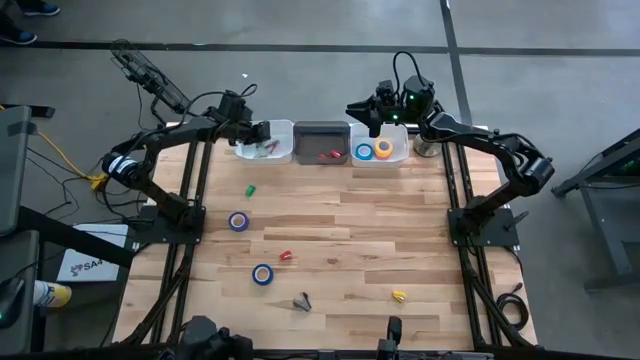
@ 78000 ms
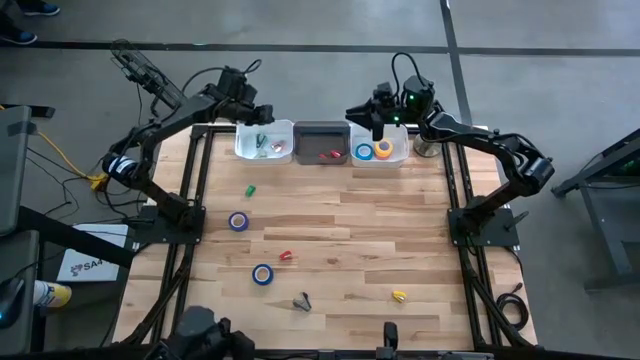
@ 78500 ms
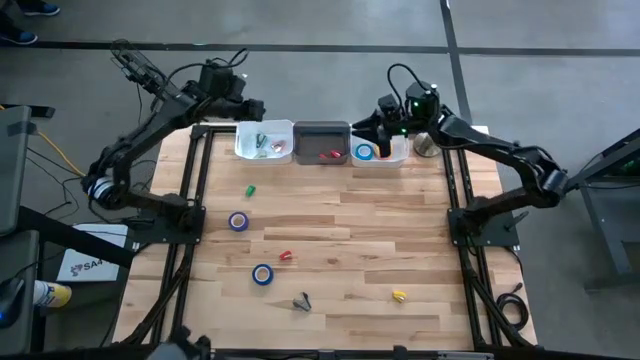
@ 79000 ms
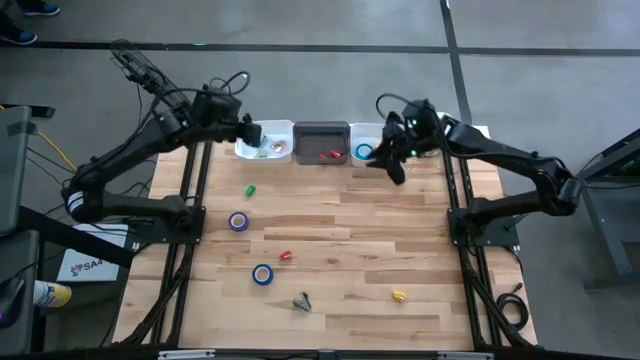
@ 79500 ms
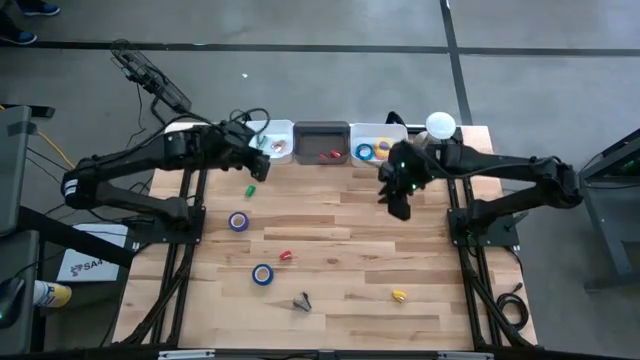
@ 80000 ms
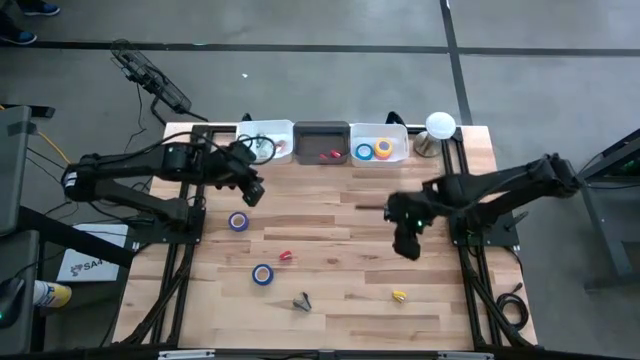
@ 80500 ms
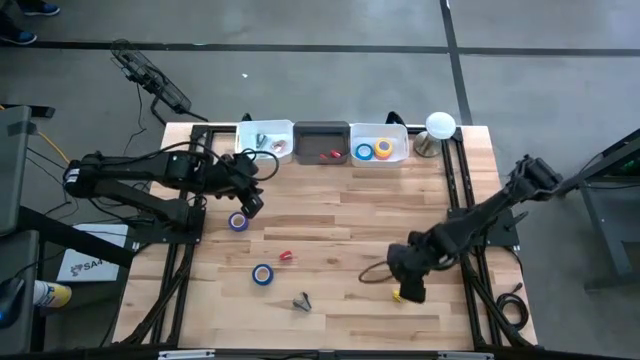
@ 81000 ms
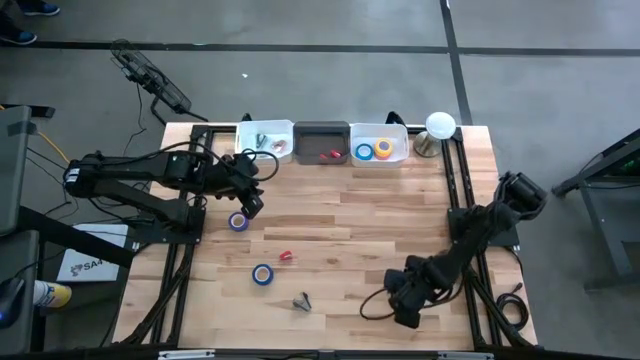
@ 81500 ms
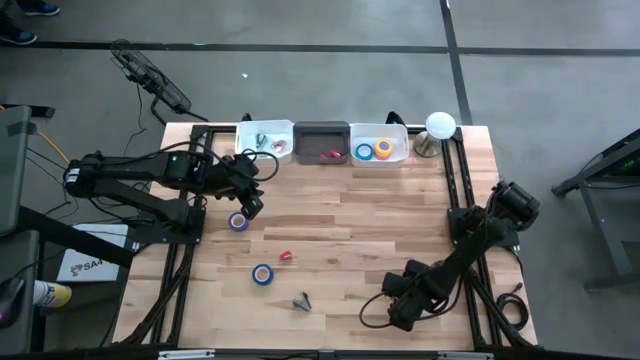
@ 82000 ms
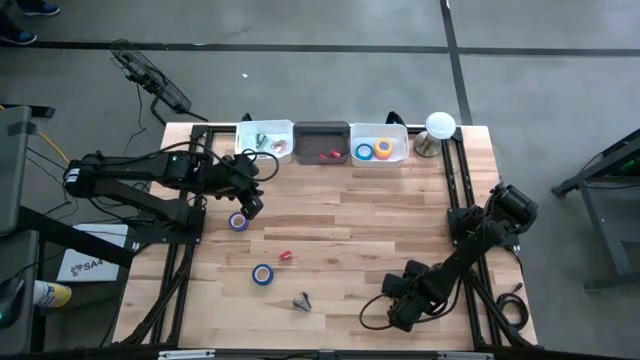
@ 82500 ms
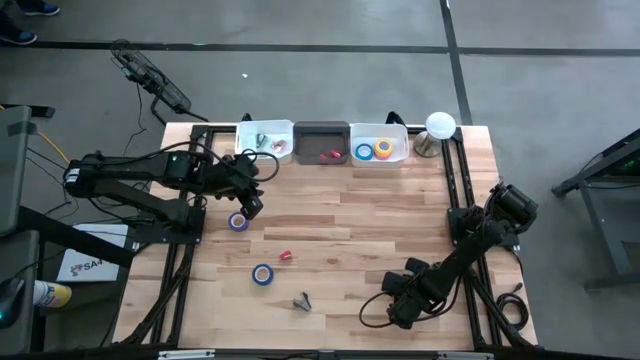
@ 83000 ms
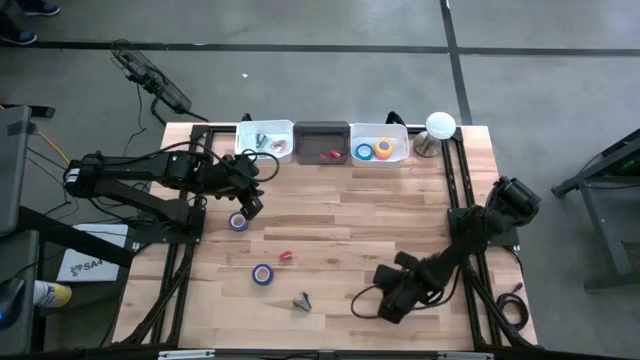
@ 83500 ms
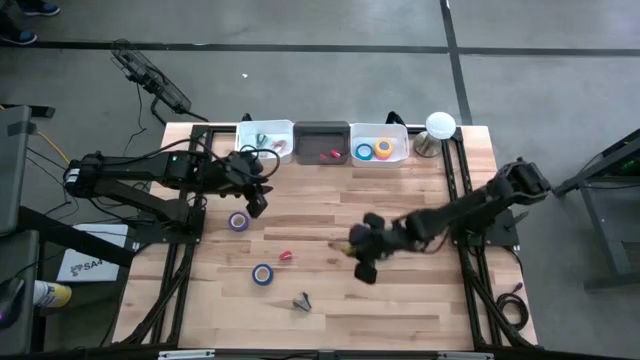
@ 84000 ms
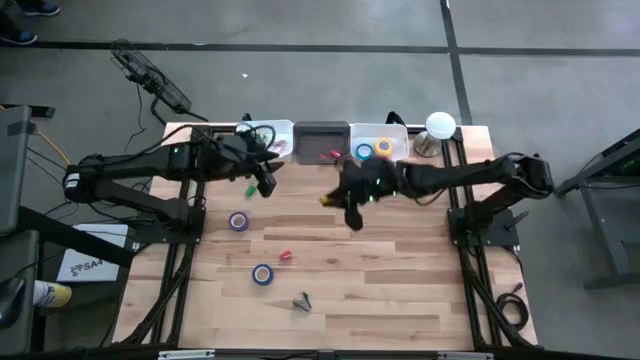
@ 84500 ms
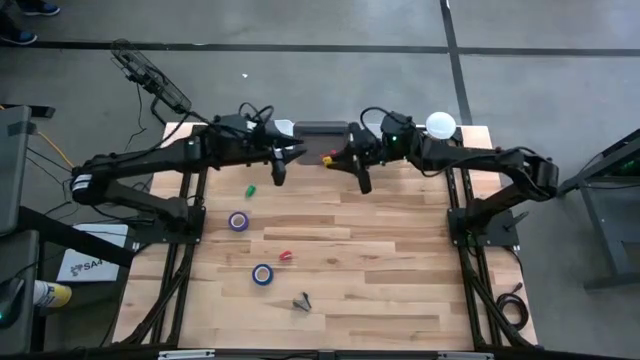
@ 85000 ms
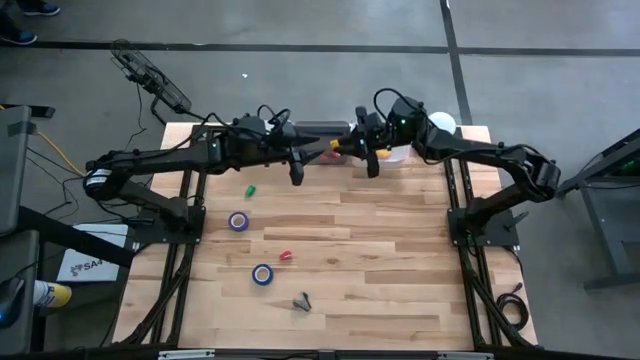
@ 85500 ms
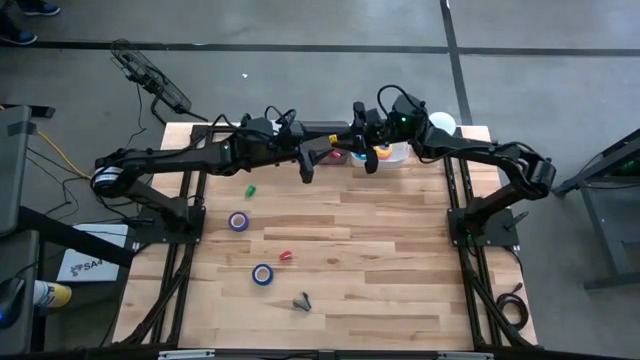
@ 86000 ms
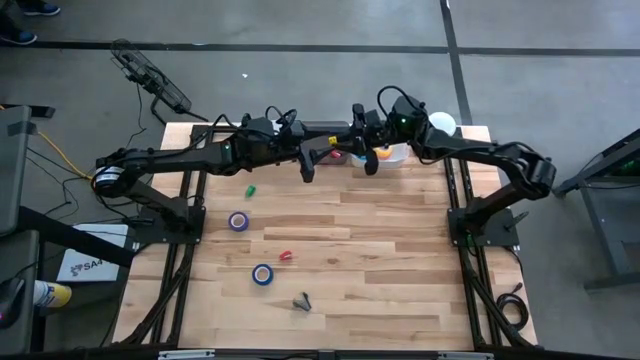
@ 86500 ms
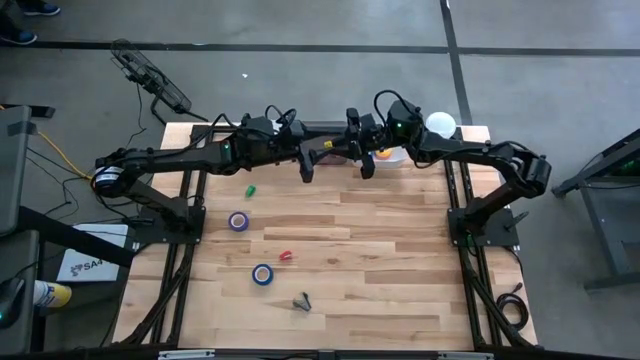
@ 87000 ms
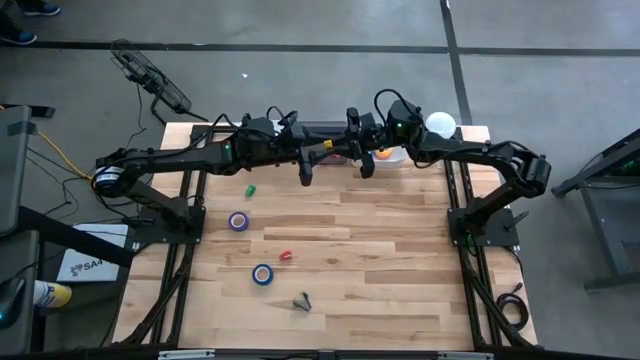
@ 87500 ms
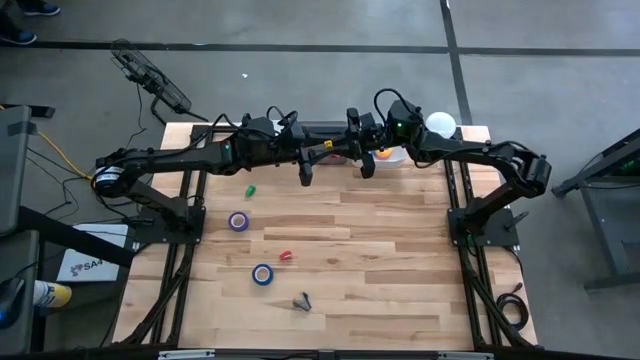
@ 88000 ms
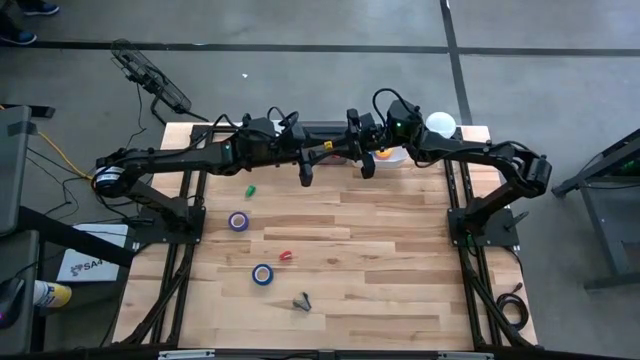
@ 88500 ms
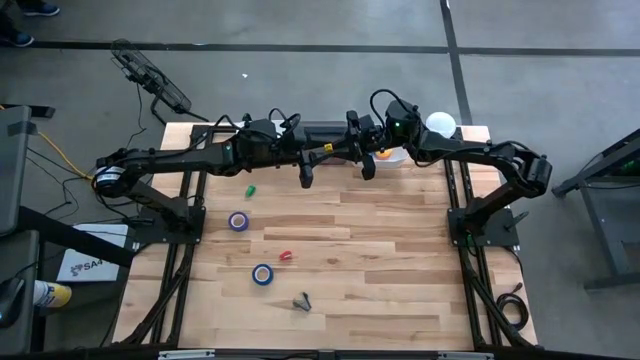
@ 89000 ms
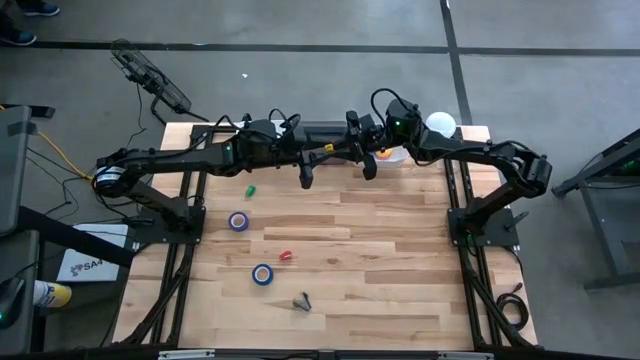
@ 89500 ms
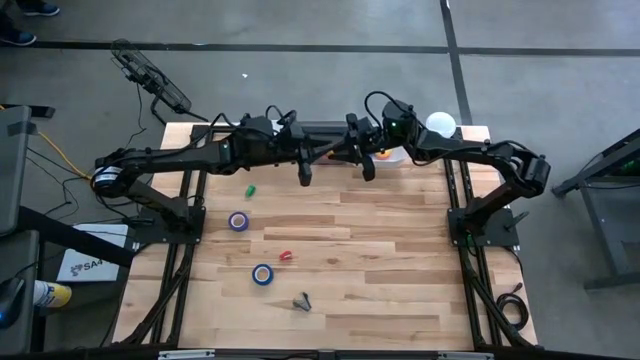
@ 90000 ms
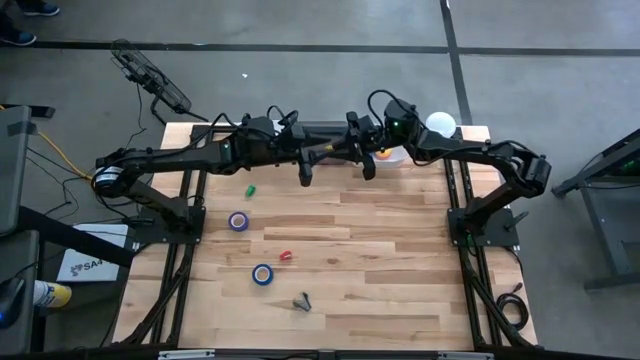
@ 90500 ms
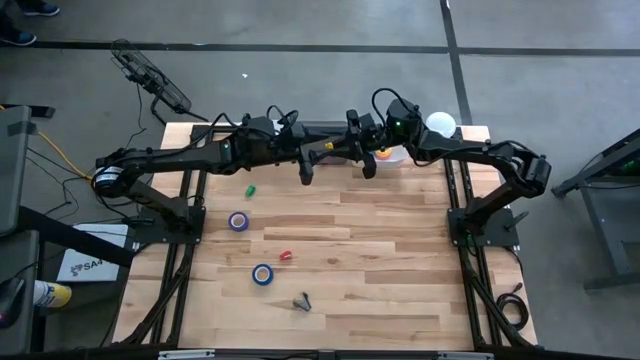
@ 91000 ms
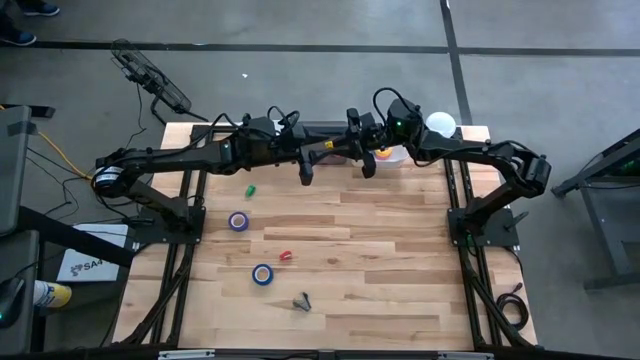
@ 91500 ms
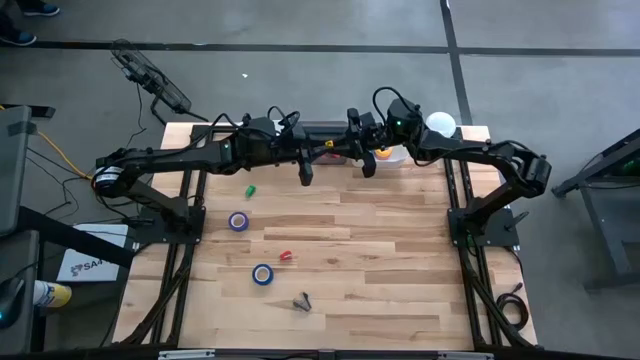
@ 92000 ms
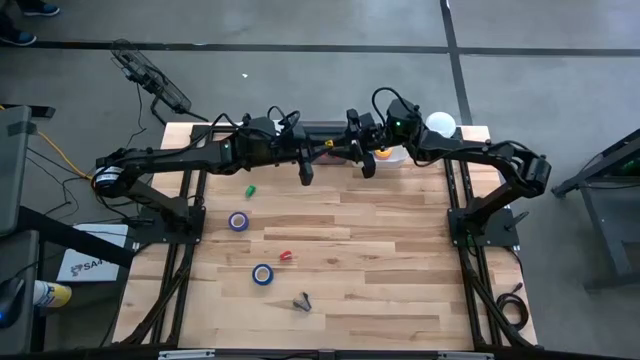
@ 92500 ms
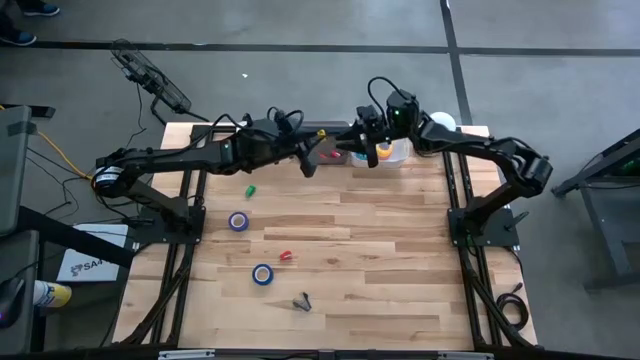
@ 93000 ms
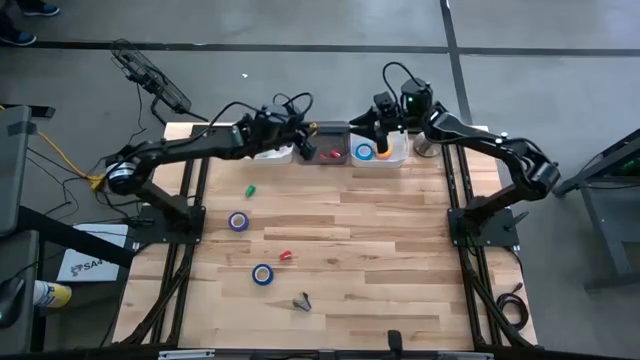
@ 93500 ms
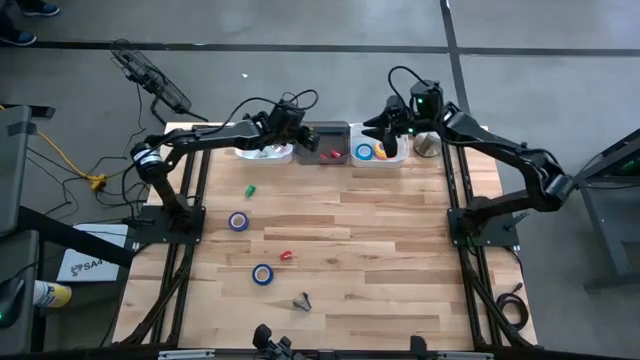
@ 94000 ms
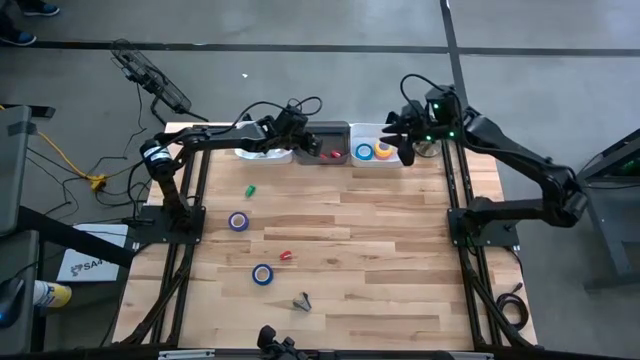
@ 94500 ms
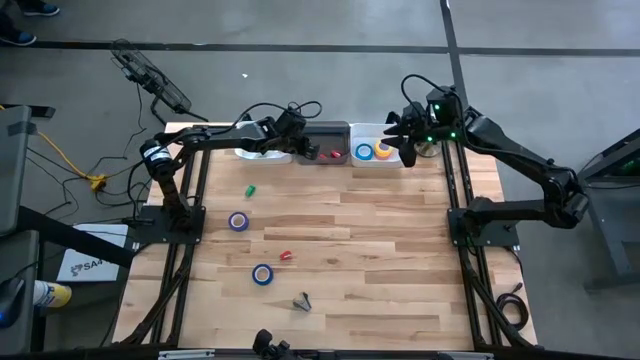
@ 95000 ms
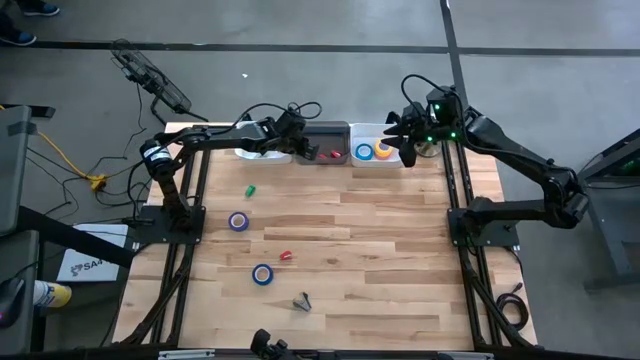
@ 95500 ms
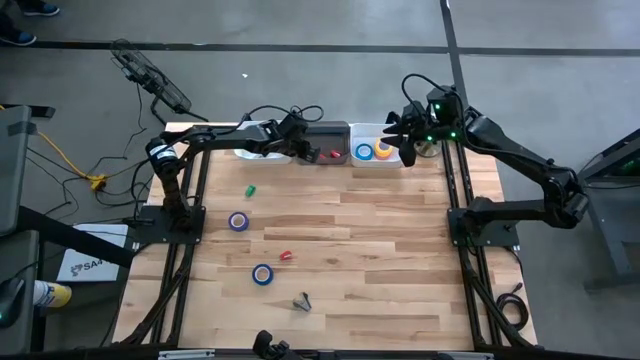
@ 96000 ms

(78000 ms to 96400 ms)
Task: Pick and place Stapler, Stapler remover, tape
Put the yellow stapler into the black transparent bin

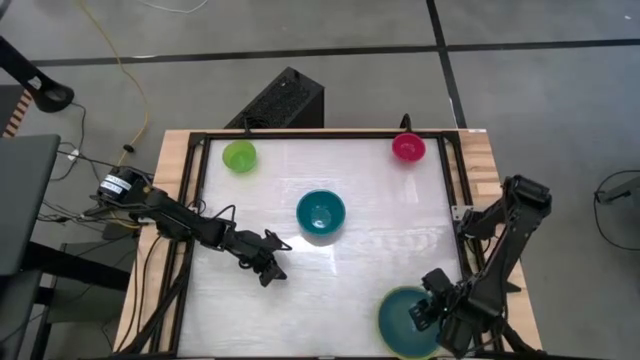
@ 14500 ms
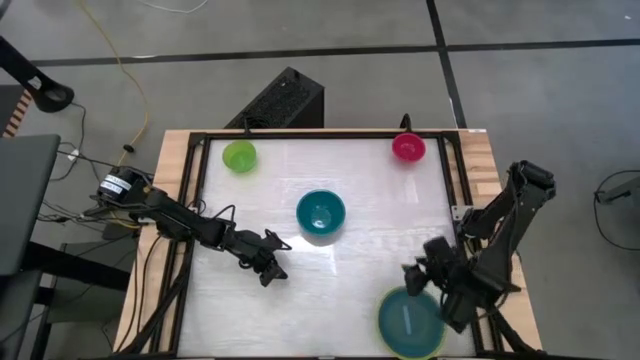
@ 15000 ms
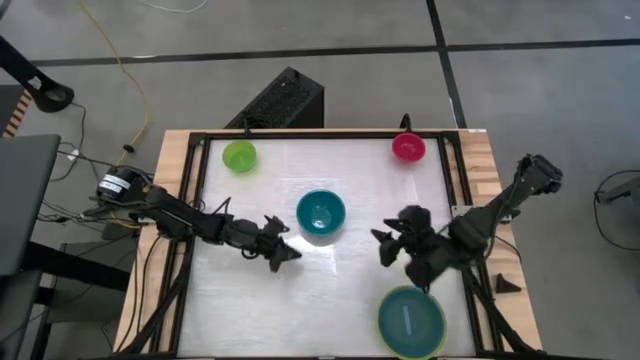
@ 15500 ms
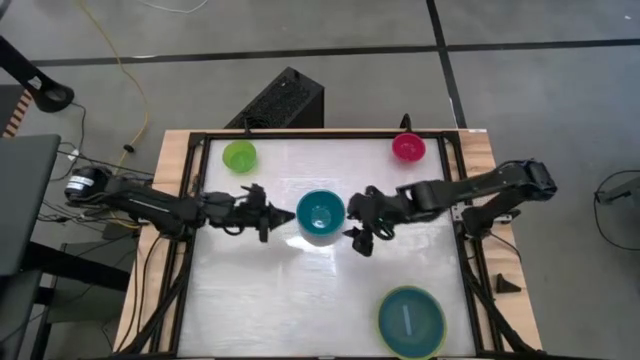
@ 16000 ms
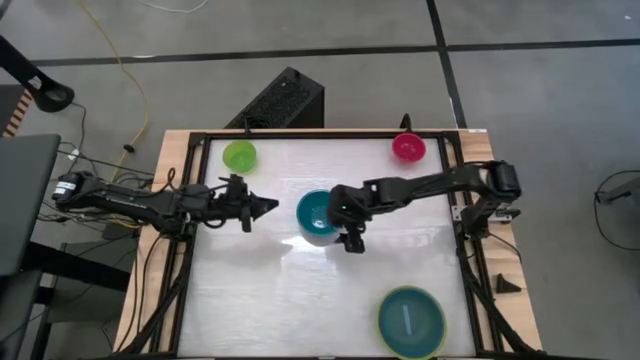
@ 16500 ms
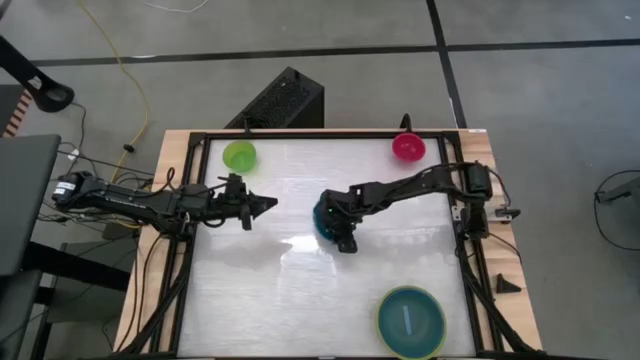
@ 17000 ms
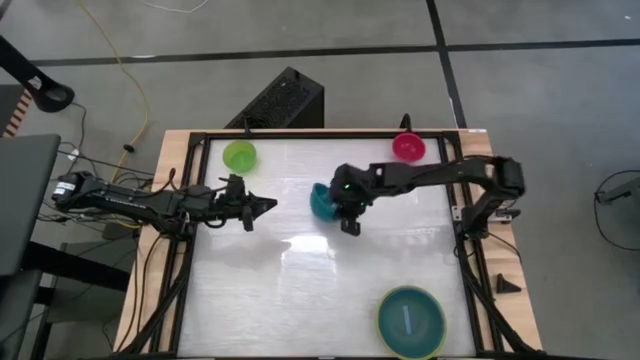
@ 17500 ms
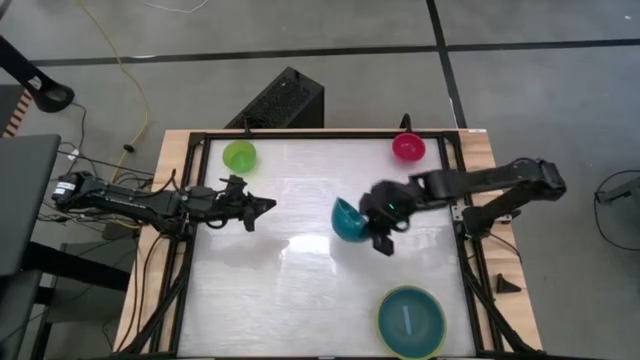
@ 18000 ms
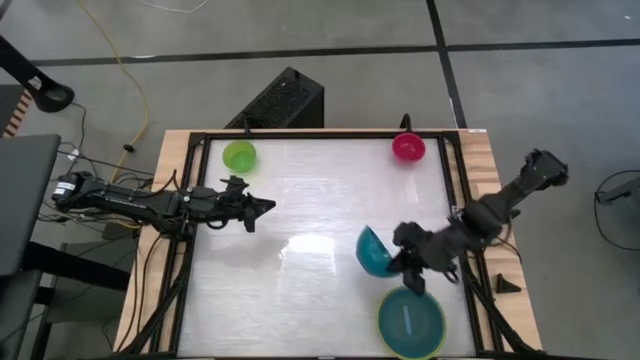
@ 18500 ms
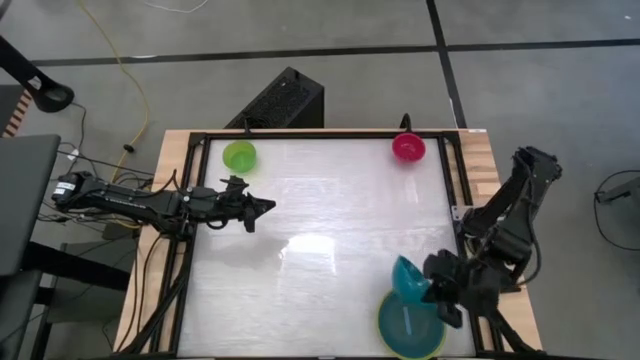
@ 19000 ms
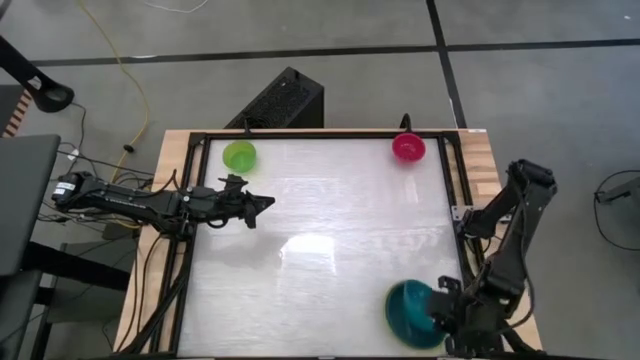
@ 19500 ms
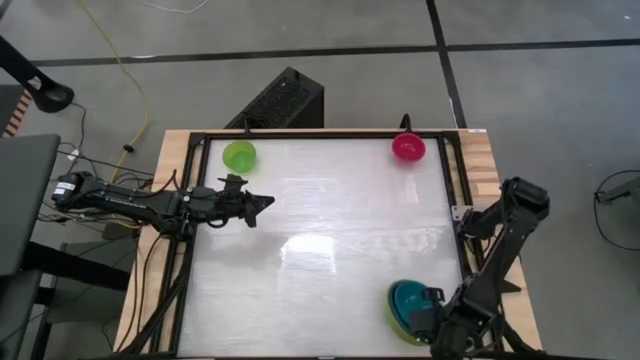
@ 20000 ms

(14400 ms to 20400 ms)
Task: Nest bowls inside each other by size order
Stack the dark blue bowl into the light blue bowl
